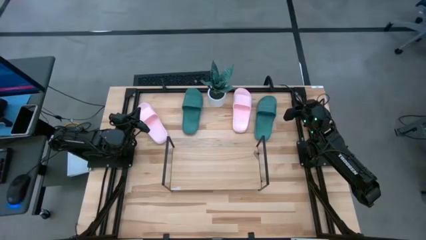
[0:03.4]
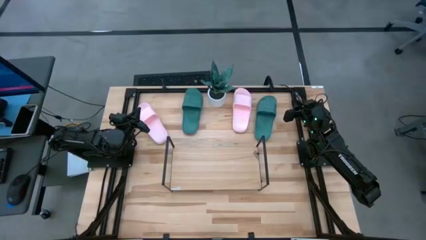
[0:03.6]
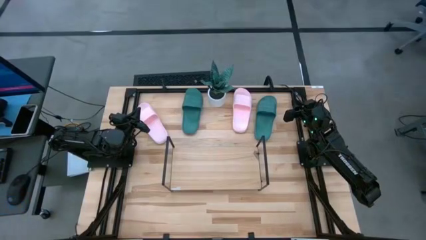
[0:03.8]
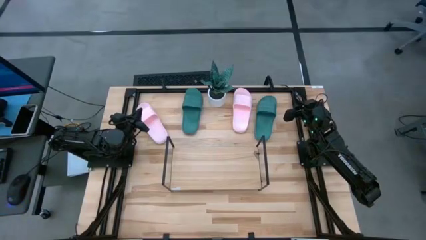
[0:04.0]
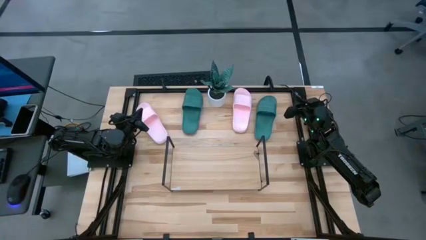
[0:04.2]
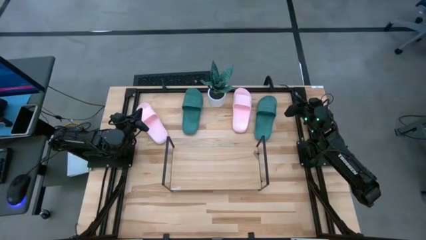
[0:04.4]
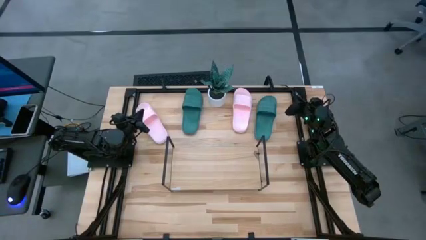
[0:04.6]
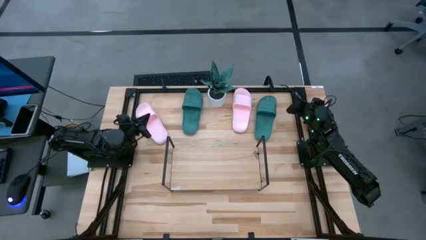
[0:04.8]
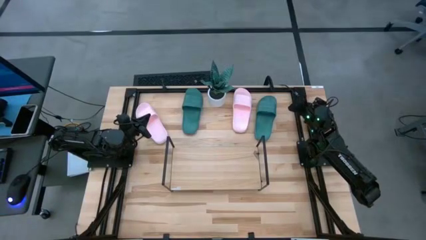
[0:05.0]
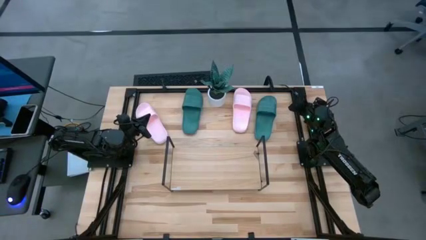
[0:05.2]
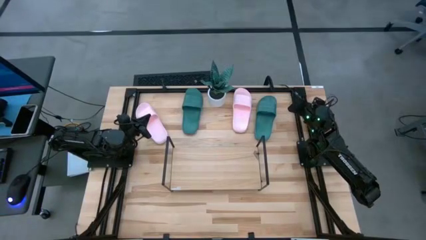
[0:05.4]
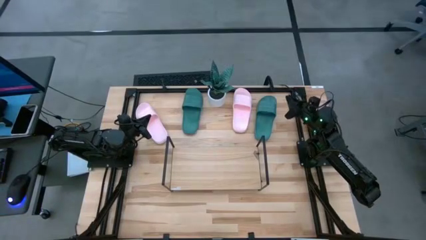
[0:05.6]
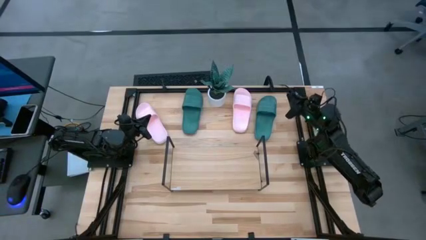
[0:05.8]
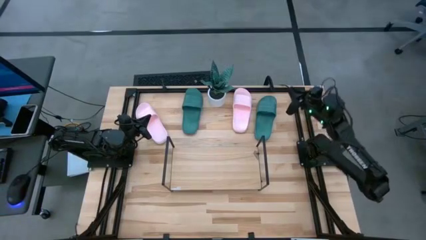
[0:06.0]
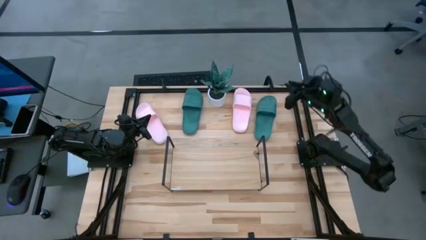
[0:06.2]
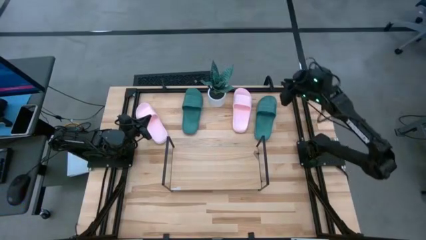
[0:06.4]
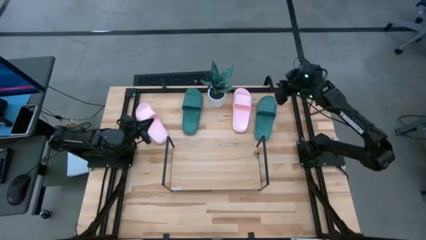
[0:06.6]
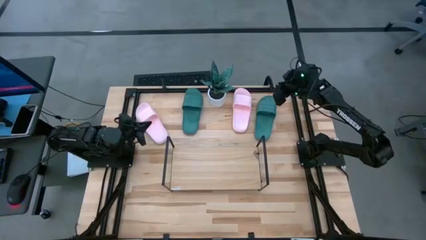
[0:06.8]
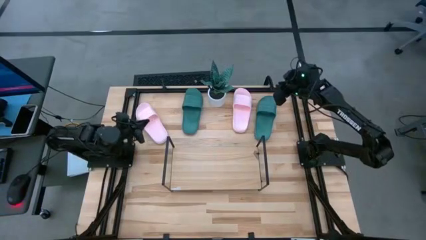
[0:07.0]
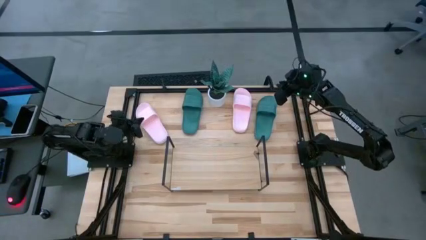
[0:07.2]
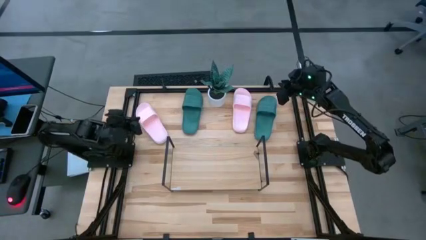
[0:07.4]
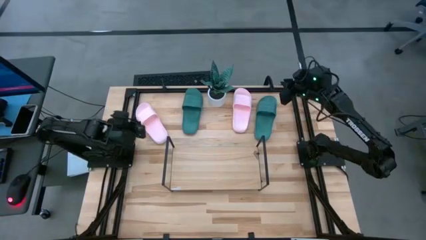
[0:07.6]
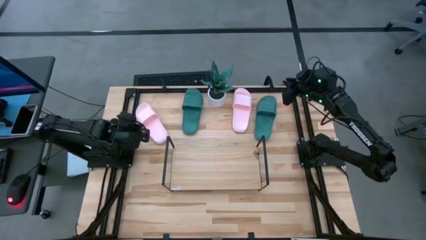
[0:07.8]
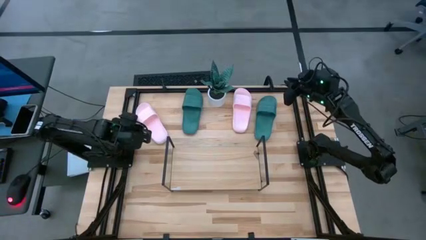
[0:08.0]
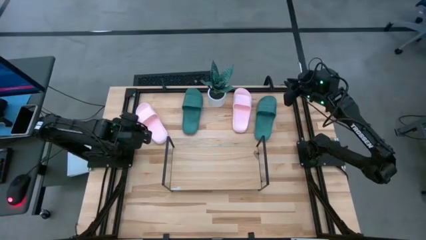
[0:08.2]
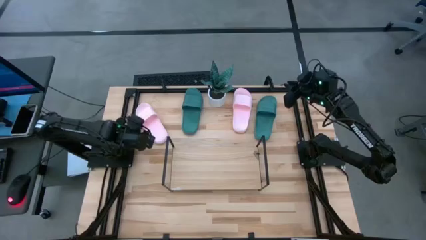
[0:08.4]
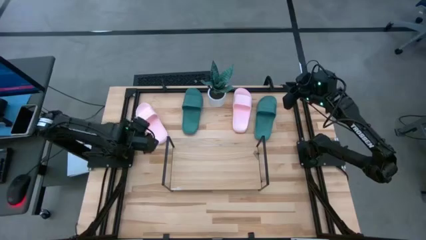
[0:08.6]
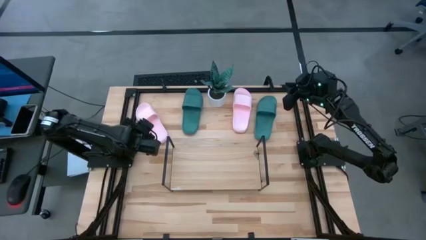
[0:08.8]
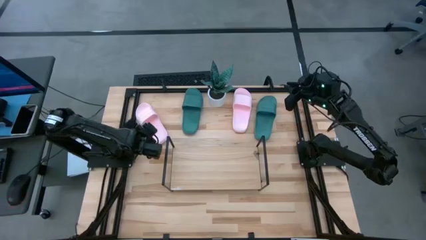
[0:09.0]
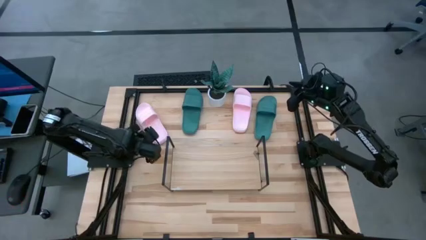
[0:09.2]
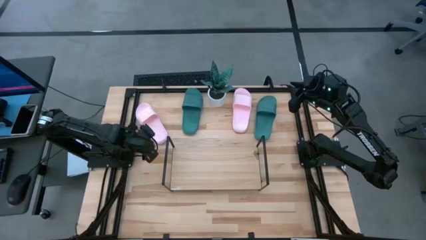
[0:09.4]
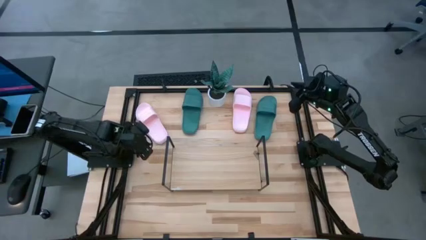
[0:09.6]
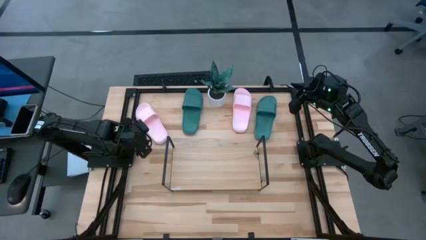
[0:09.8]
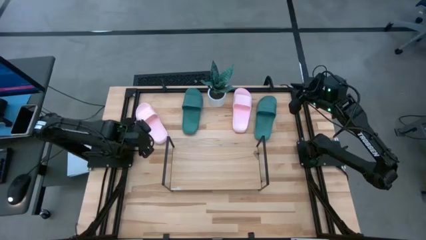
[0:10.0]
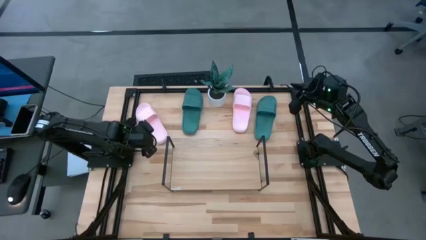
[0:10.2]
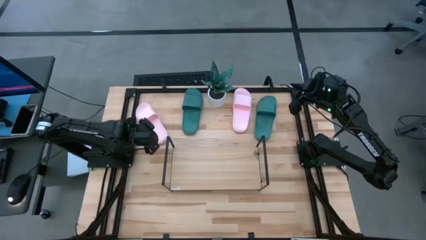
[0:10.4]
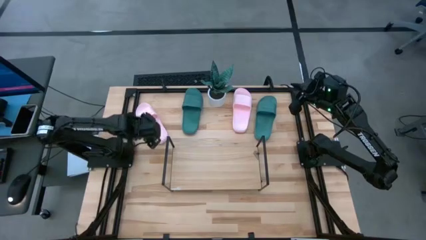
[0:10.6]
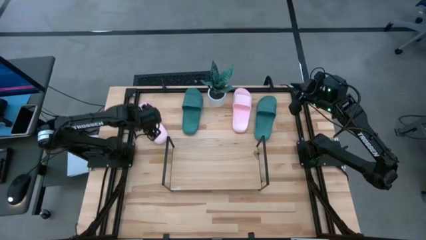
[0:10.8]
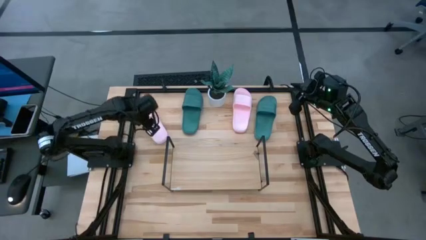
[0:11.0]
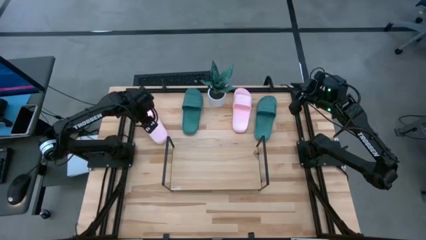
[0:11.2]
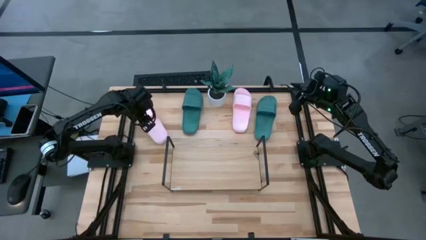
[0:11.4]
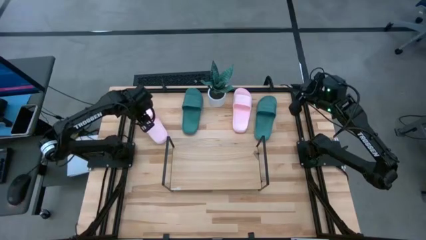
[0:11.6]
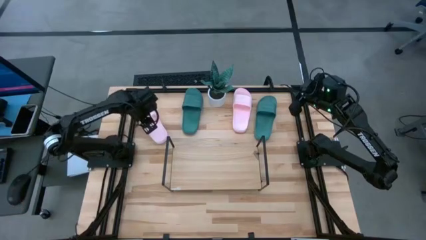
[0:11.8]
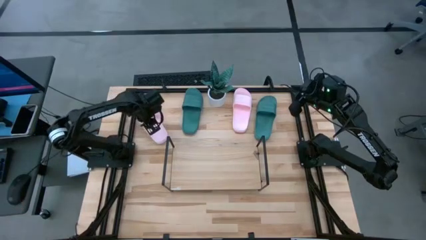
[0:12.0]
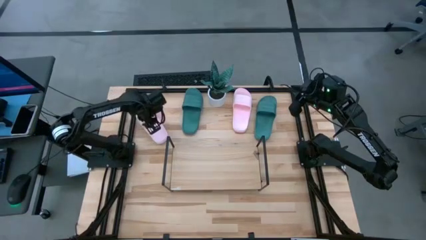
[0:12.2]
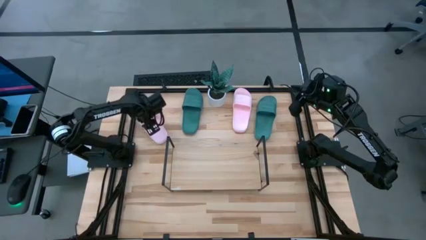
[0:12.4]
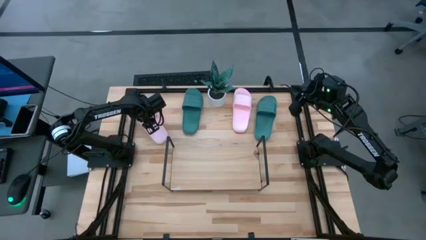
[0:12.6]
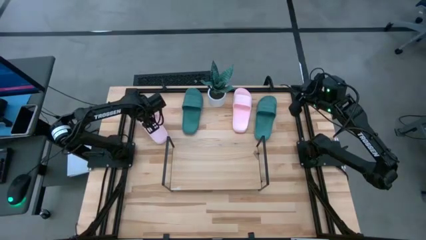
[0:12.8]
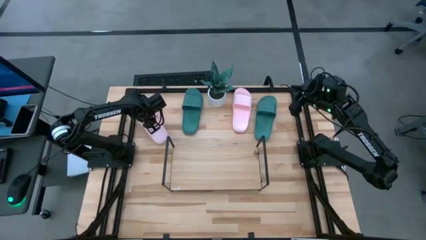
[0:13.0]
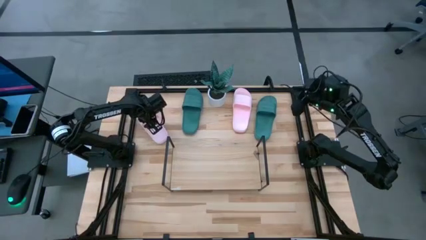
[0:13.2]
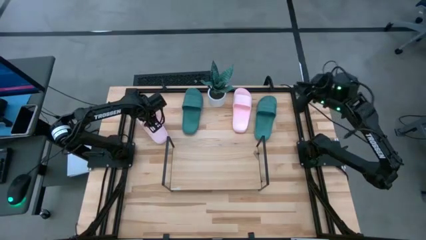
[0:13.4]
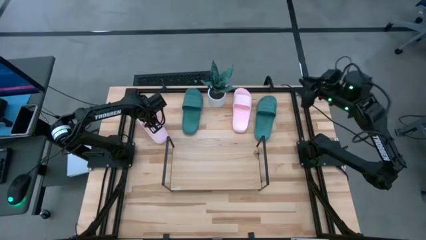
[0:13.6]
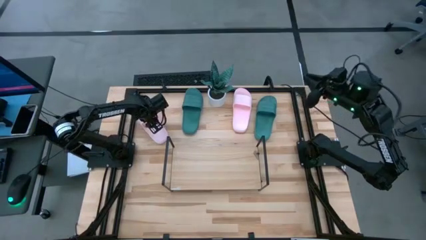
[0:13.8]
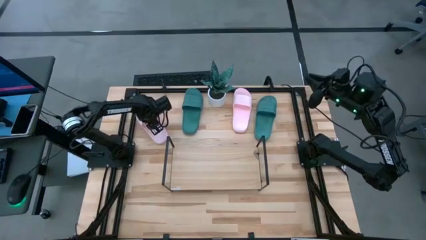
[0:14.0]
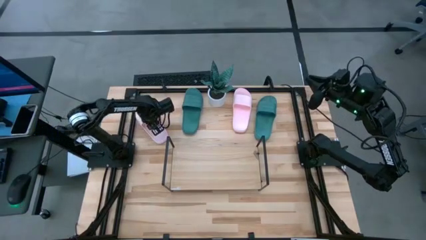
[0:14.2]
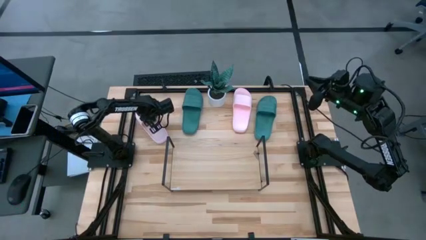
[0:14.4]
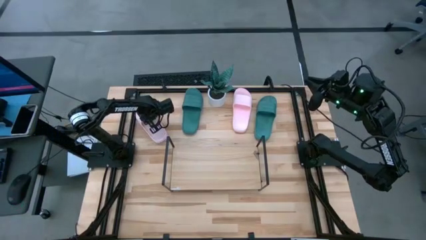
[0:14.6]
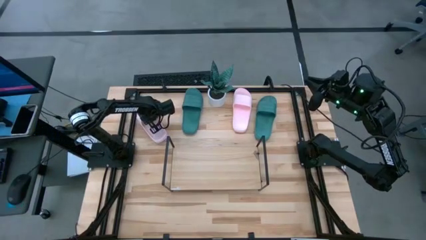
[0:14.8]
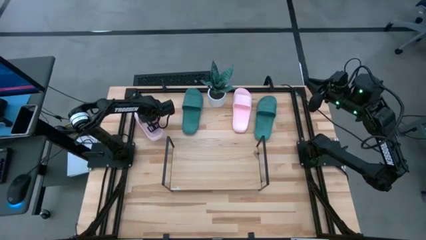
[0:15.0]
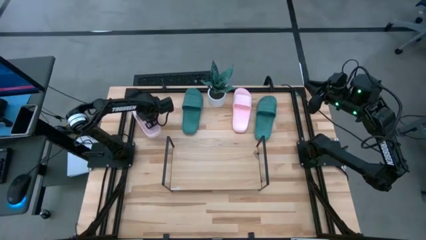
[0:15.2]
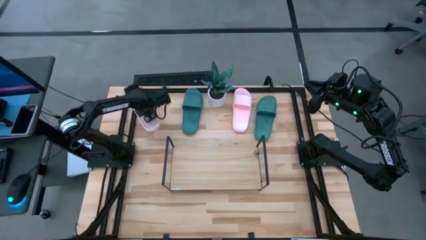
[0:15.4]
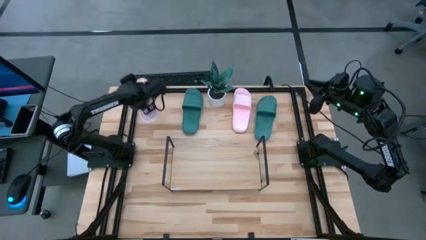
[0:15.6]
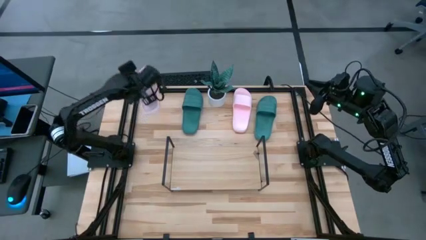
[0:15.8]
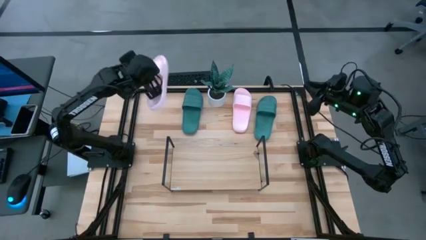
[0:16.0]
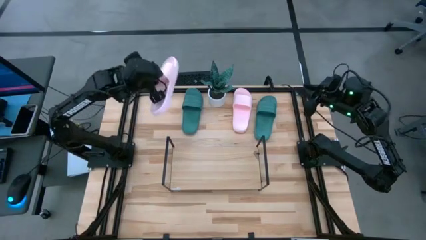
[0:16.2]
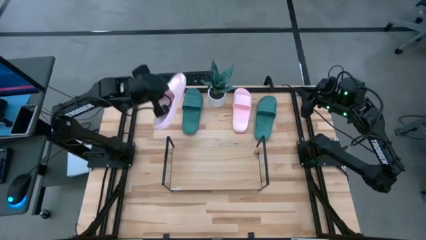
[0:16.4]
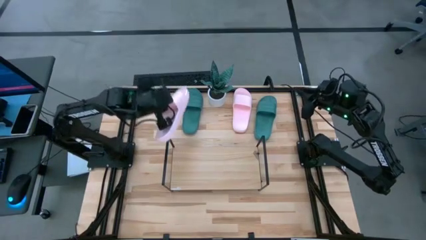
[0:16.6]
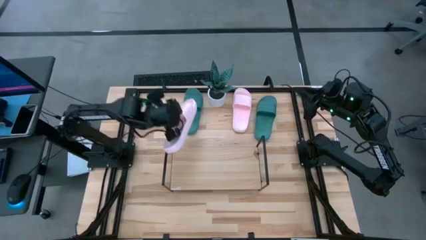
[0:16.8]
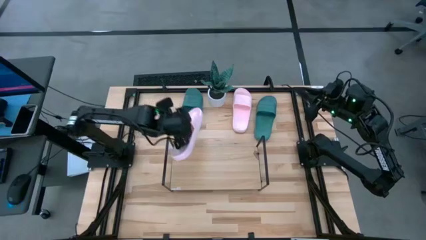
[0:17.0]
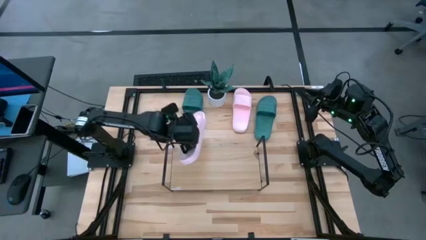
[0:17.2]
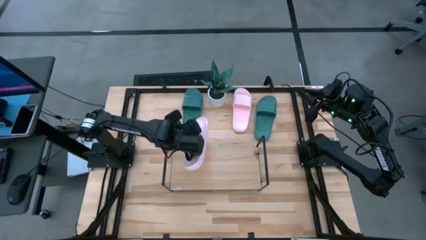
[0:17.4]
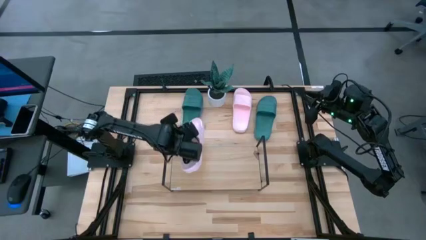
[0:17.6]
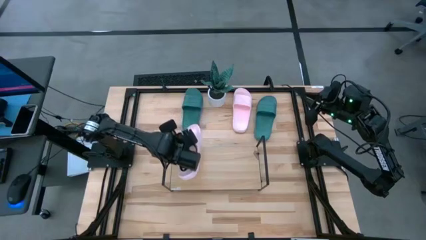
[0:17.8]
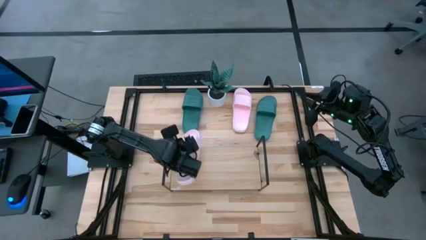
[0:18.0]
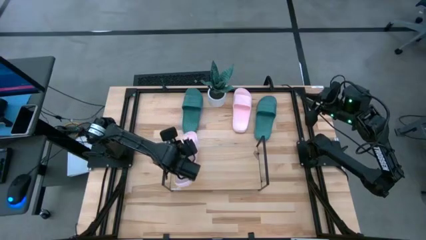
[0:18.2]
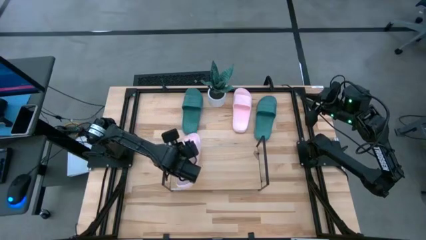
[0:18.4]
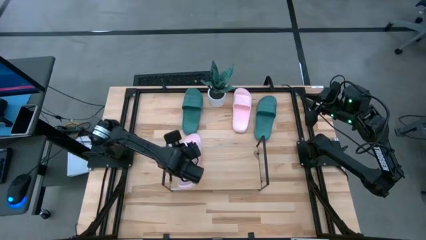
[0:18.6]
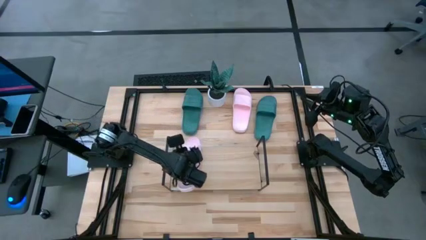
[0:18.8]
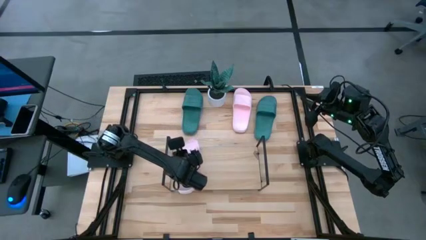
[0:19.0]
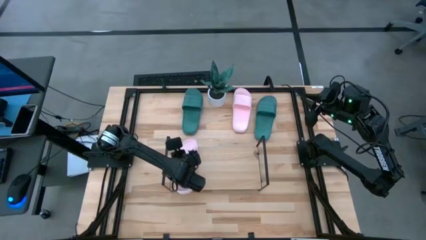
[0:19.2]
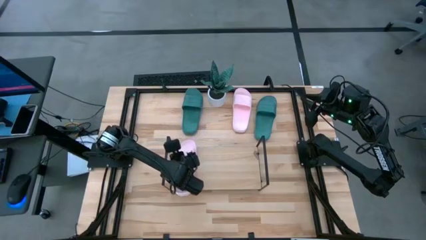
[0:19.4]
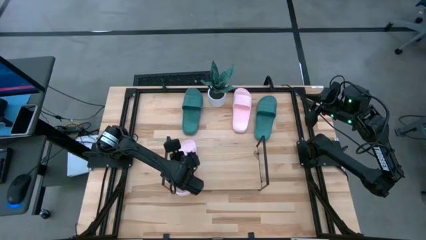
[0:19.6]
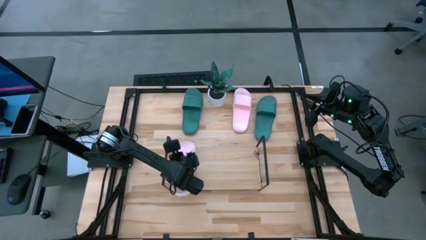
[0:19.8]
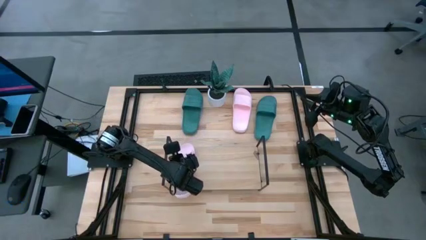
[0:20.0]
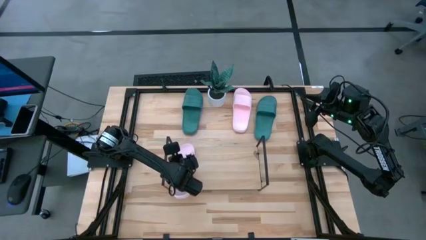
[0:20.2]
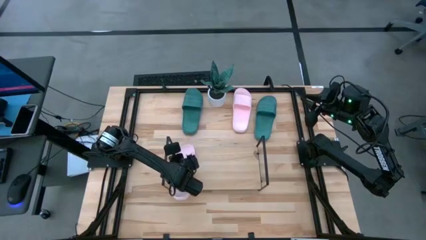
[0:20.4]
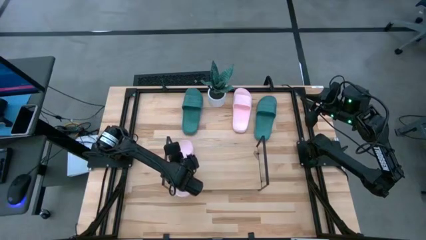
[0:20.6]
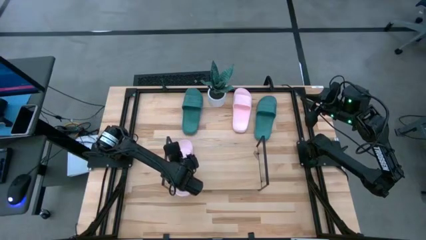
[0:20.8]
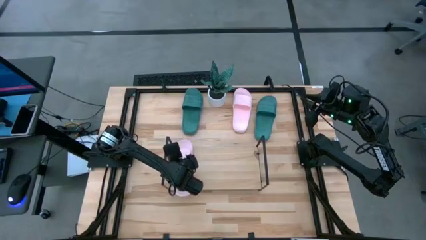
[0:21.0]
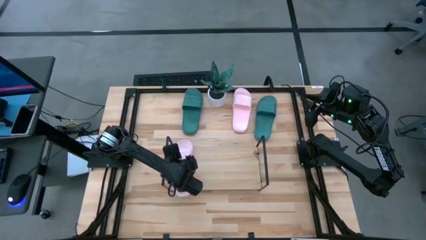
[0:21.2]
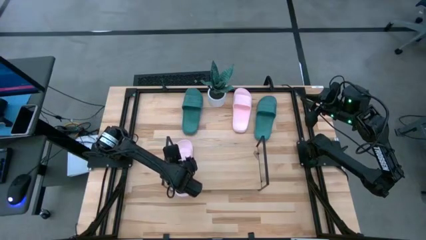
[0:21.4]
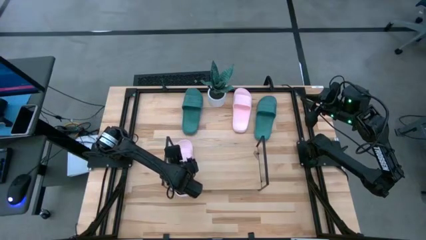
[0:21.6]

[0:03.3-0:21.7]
Task: Pick and place slides into the shelf
Put the left pink slide on the shelf
